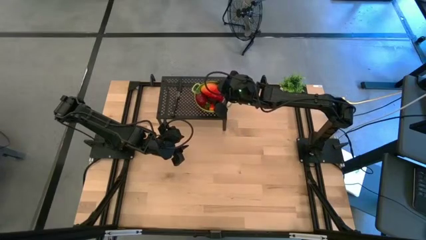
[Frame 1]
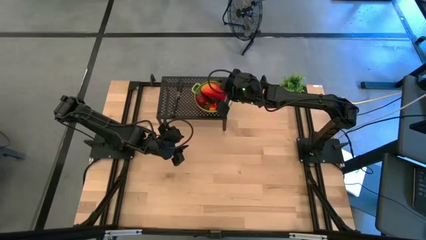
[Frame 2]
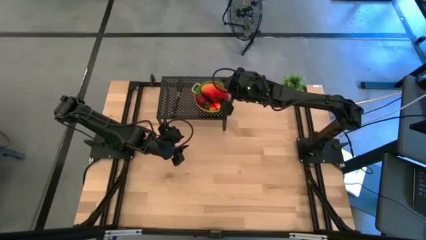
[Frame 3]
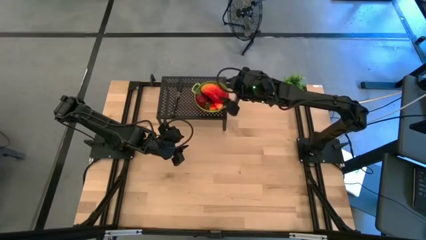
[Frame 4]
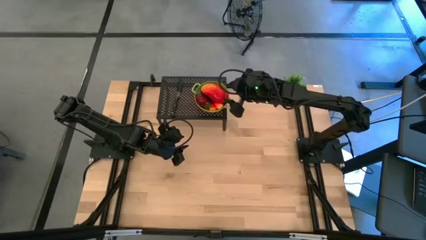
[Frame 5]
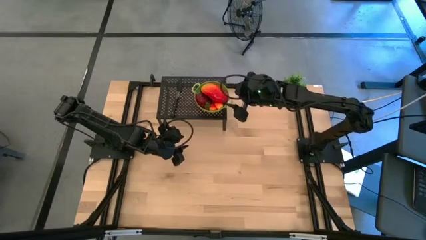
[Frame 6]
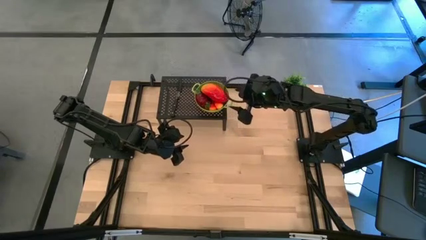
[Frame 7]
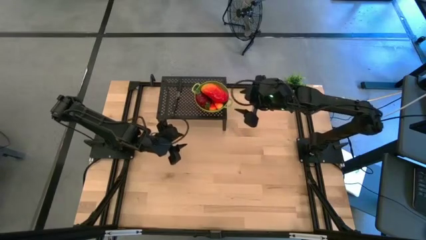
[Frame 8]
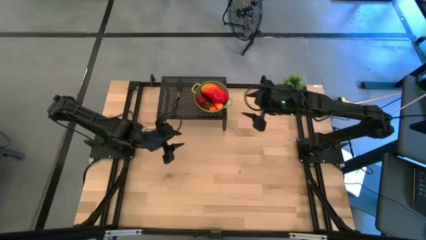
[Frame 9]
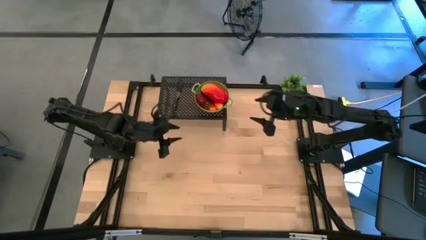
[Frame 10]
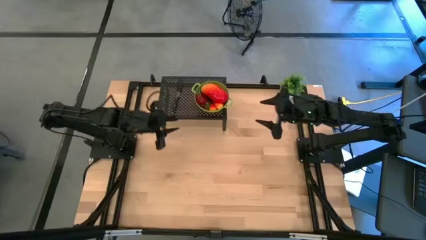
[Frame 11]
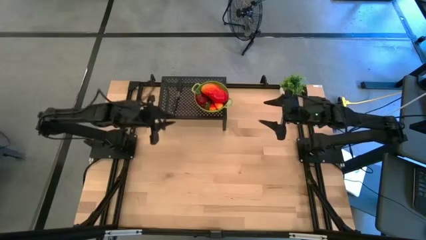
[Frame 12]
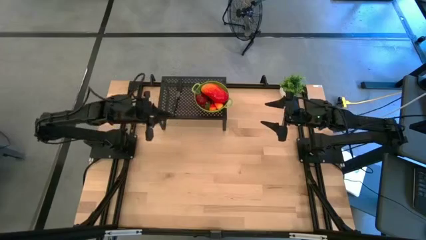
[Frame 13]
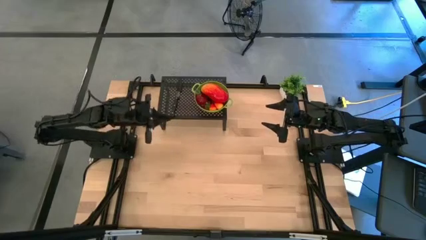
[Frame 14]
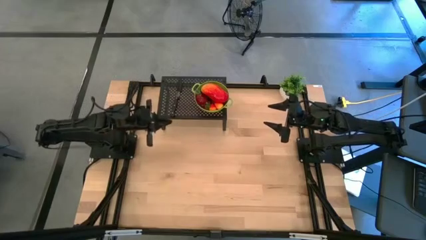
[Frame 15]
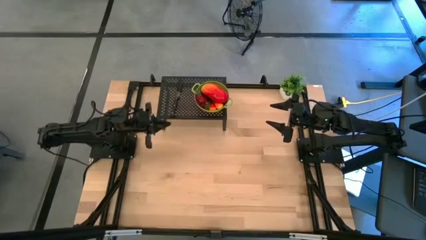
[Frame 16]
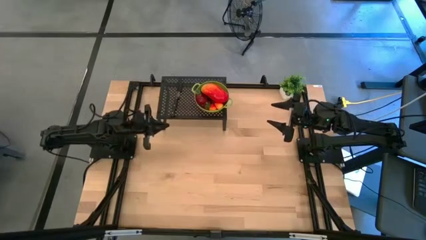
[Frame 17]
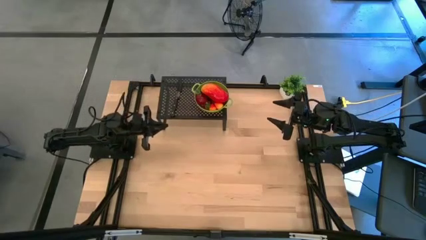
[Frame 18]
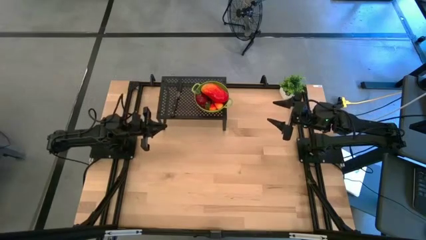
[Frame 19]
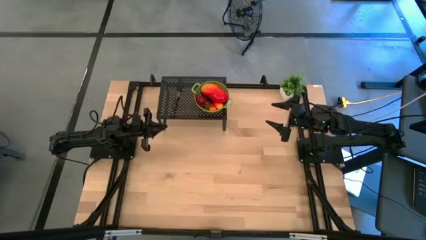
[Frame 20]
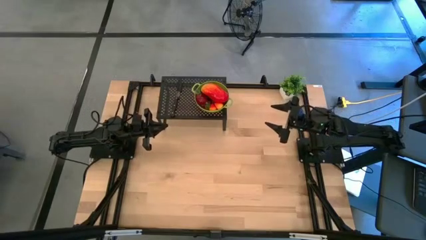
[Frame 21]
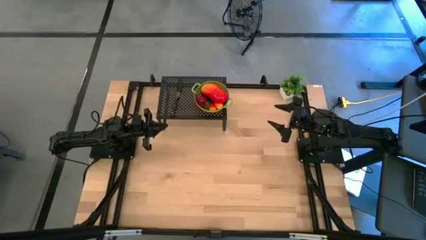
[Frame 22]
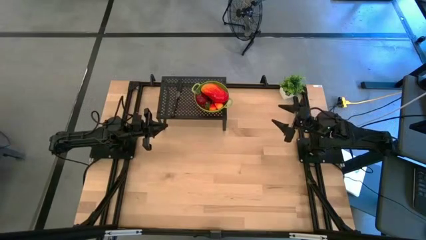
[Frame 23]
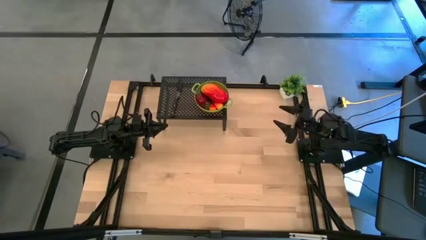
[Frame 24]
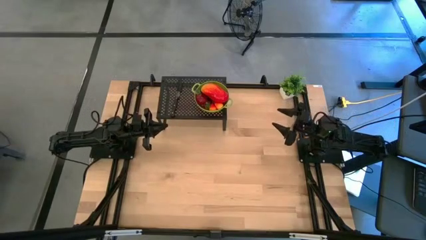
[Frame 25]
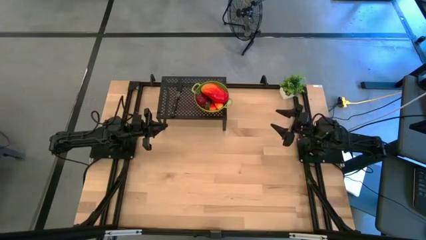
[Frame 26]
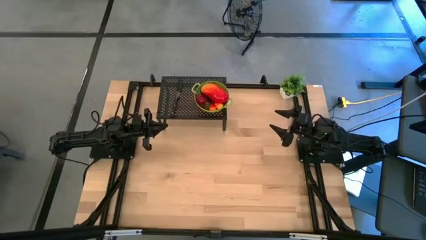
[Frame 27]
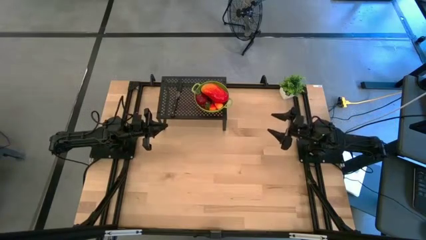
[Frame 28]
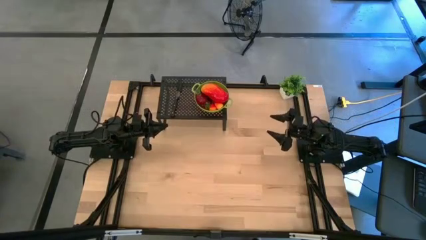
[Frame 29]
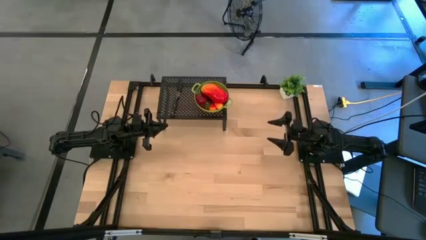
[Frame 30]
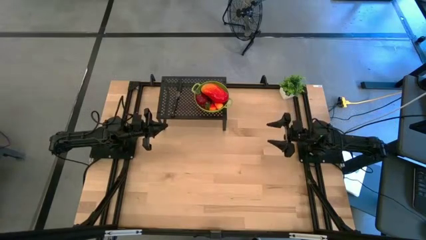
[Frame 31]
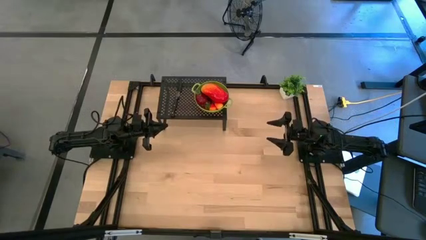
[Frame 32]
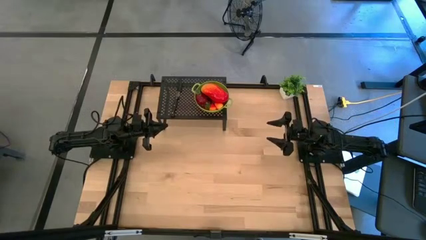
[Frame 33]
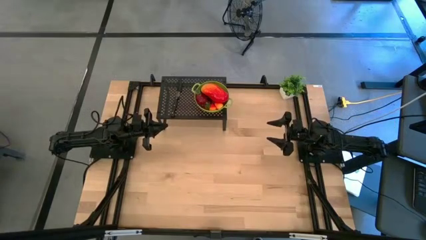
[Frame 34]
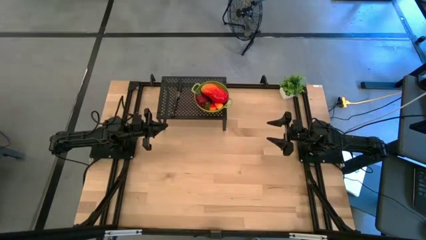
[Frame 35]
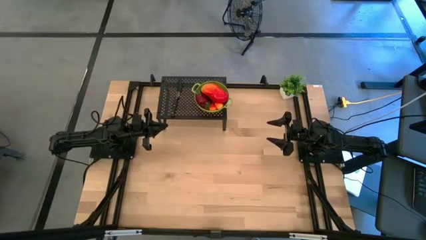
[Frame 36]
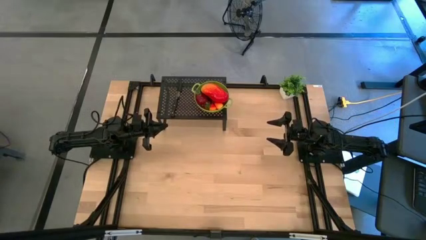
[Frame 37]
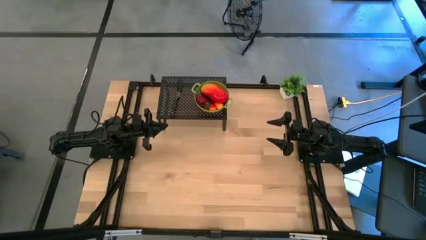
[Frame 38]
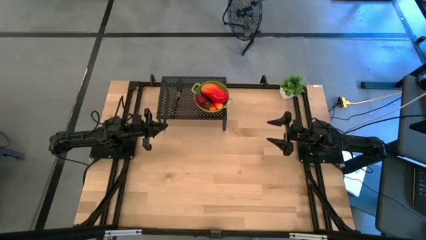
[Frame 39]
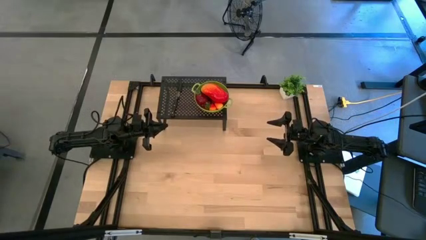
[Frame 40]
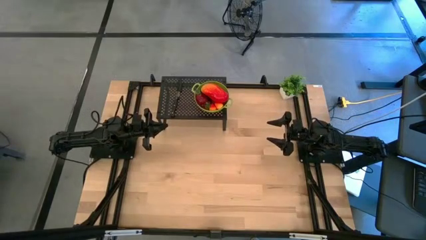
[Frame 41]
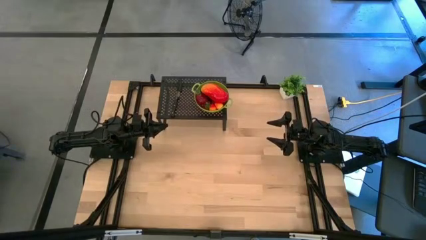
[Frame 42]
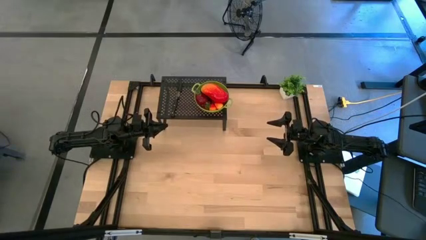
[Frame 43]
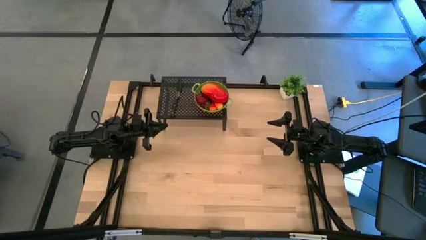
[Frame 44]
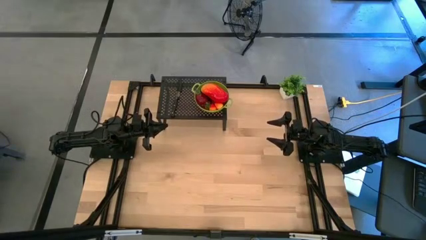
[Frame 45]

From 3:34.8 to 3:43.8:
Task: Pick & Place Fruit
Return to Home Position

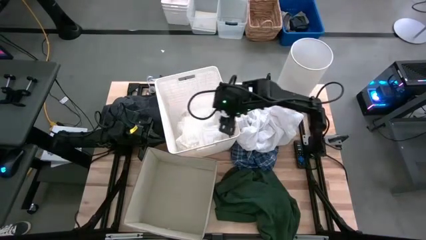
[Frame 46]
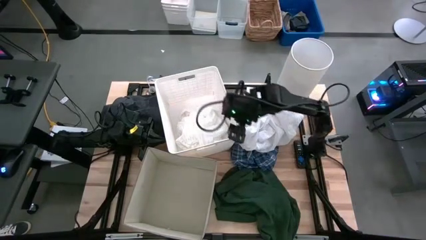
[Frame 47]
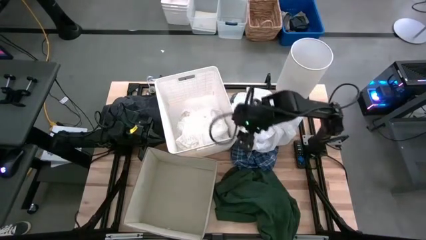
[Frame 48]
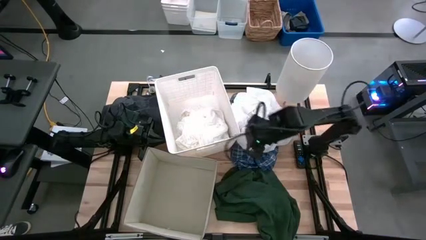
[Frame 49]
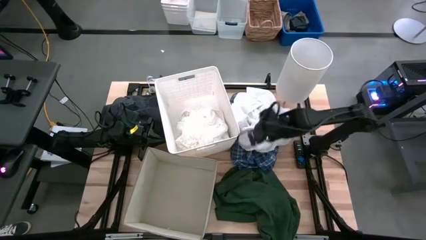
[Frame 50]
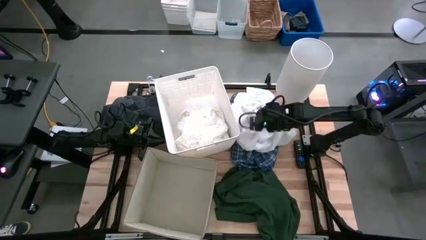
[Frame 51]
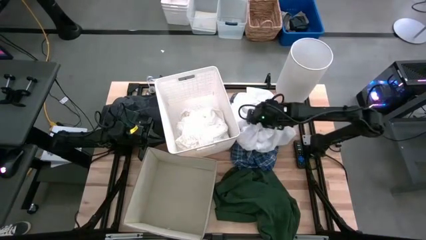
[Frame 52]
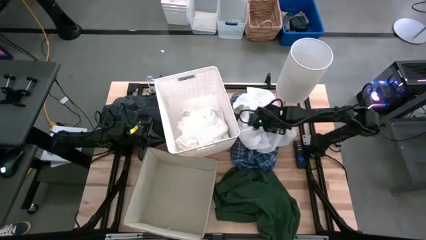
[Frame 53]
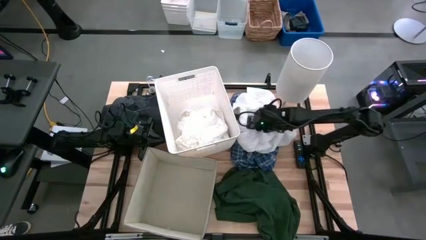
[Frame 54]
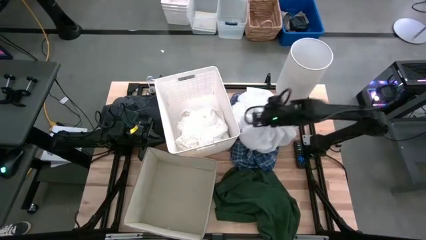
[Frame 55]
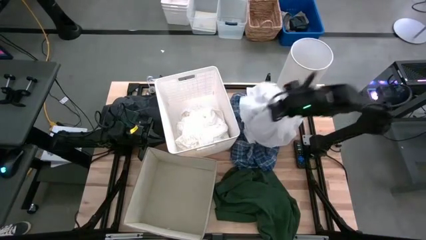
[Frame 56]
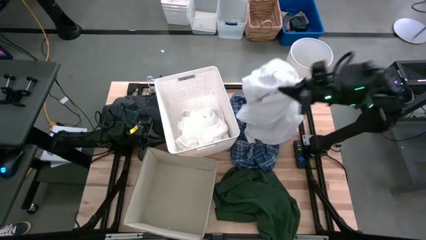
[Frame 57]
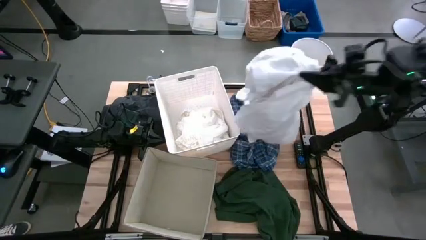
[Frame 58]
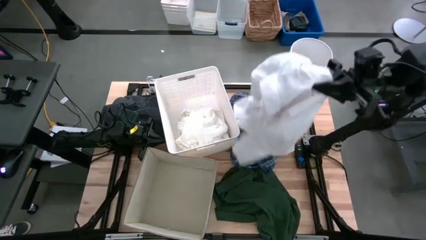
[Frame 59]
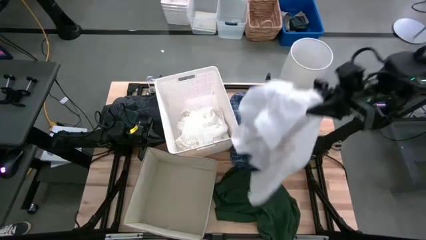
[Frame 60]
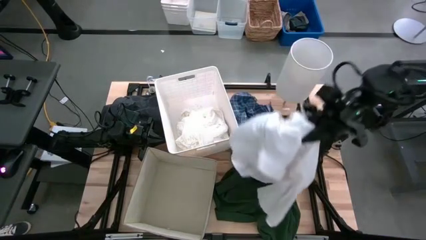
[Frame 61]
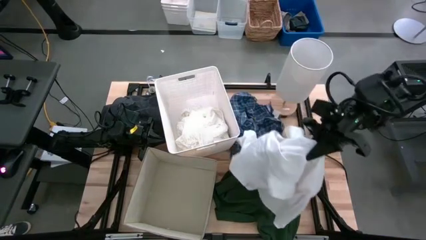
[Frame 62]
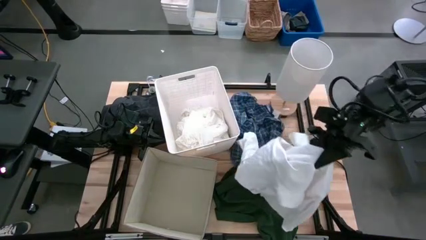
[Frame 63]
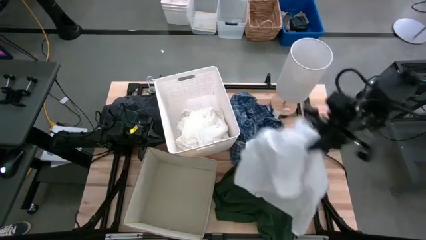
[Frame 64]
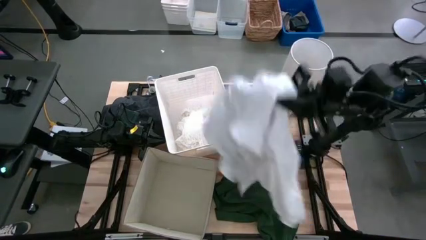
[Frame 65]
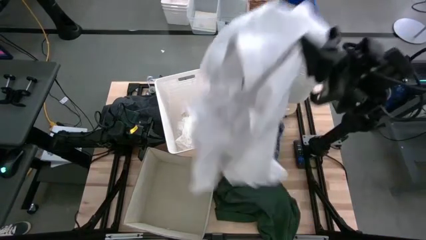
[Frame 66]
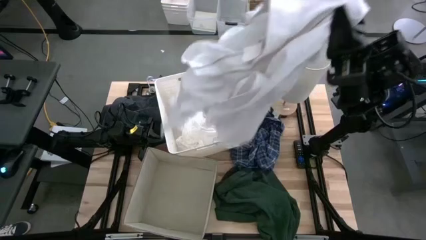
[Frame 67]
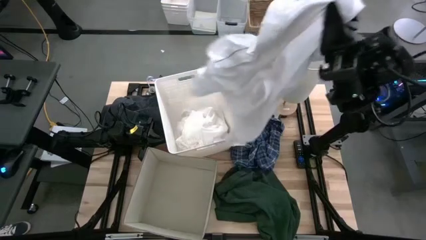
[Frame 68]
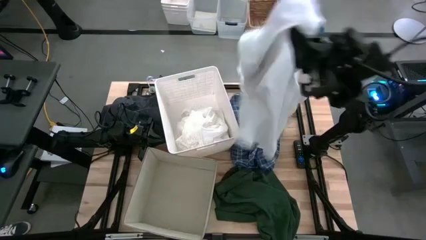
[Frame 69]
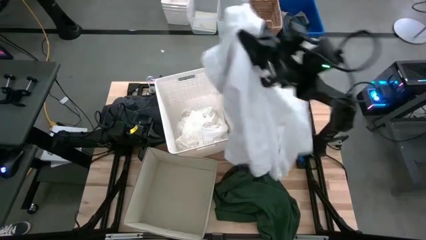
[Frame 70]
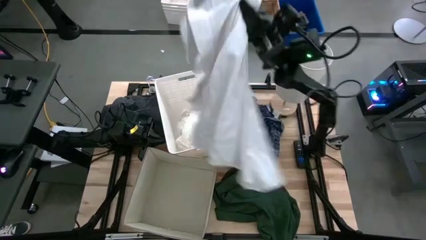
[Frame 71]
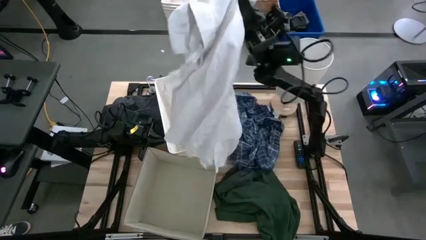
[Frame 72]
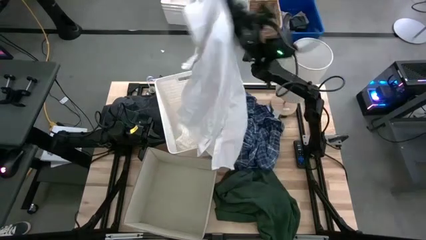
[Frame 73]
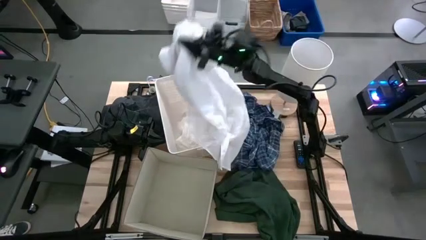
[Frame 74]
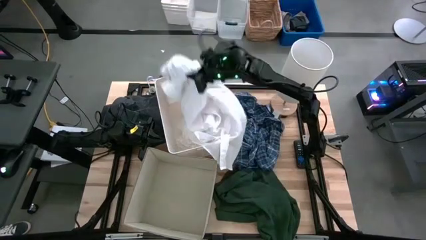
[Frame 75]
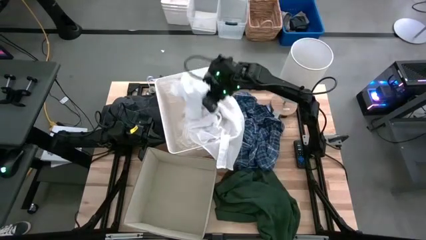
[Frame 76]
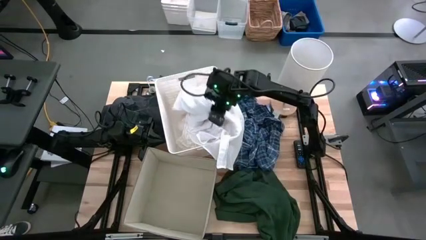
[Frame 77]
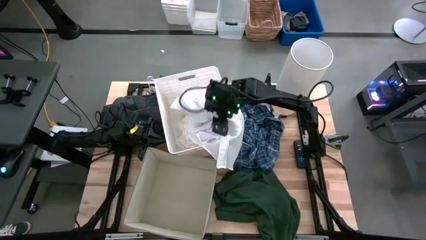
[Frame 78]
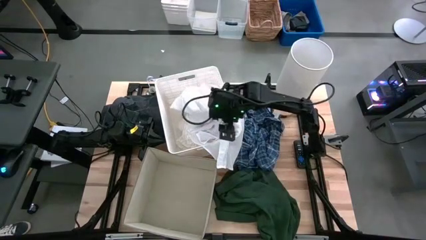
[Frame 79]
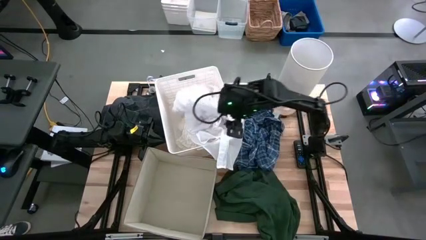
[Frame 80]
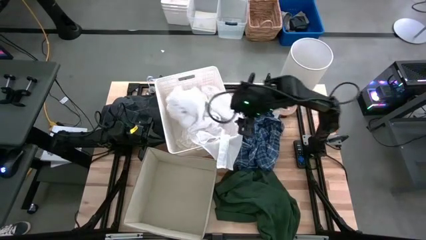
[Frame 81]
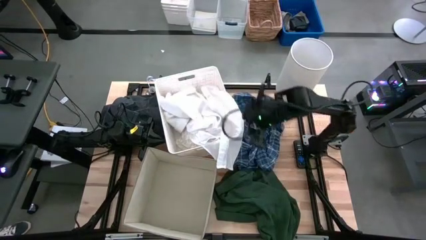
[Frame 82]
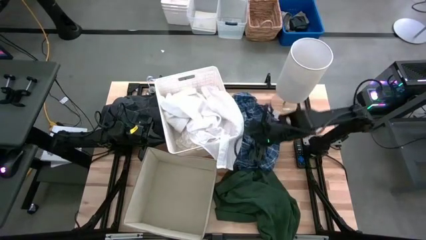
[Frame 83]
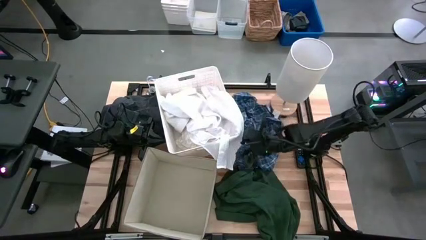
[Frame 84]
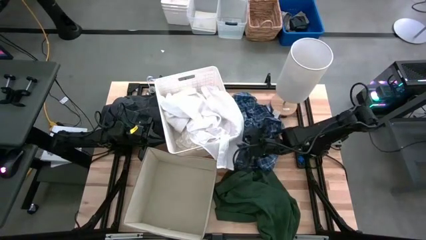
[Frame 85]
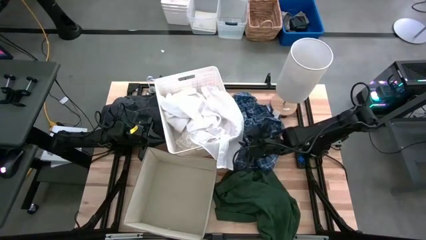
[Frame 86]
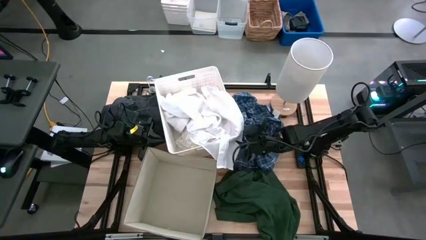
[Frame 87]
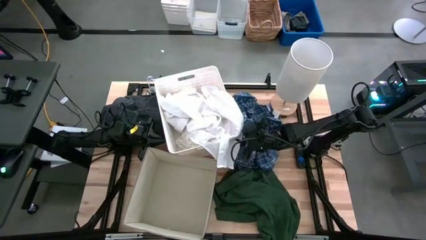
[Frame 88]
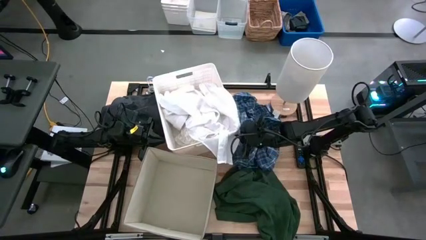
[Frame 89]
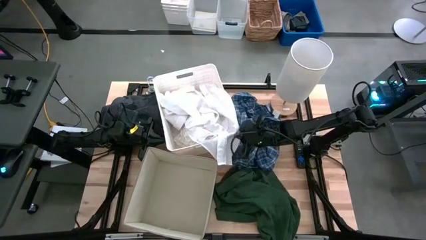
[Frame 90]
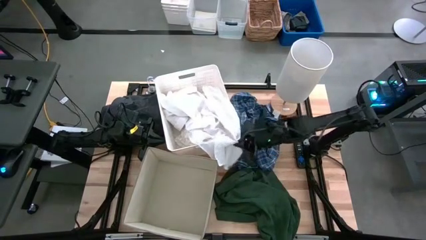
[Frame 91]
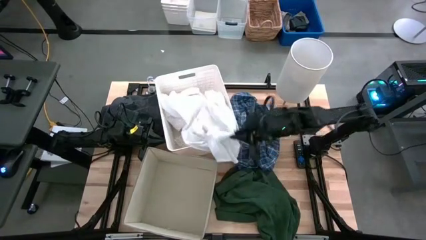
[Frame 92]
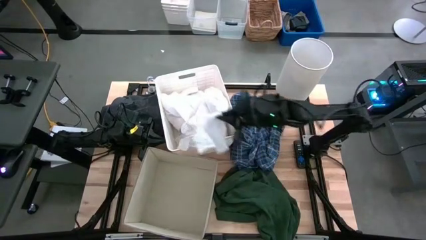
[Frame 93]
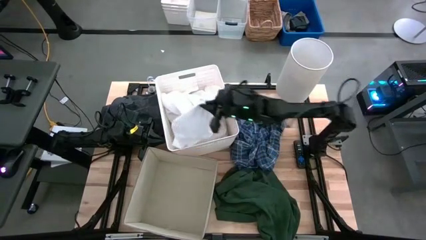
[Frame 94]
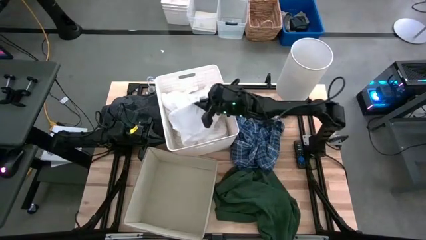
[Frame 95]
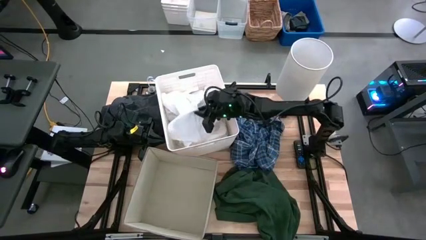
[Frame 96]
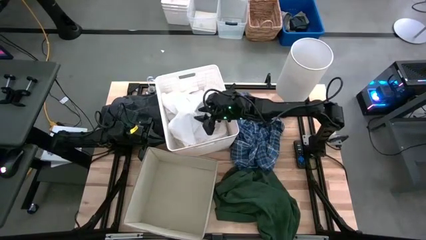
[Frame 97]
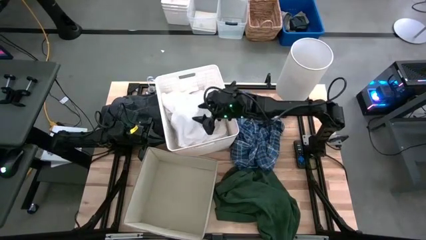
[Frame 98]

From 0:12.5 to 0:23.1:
Task: Sort clothes
Put the white polo shirt into the white bin
